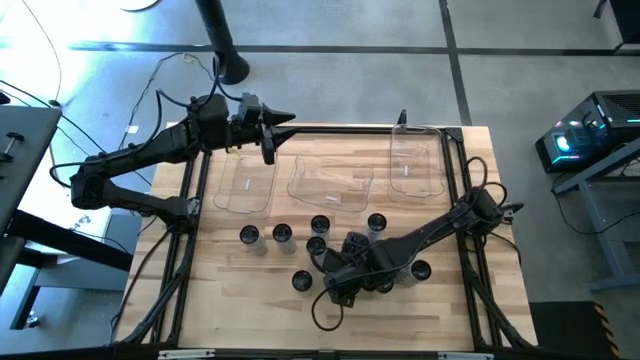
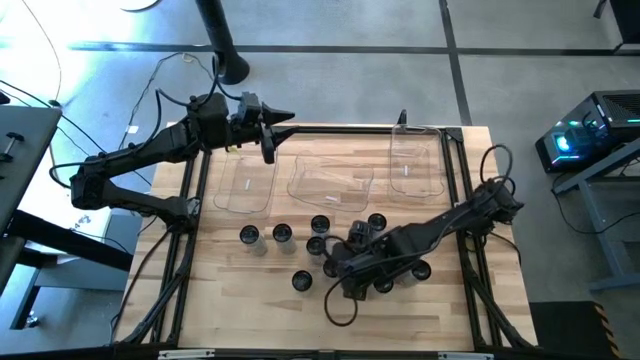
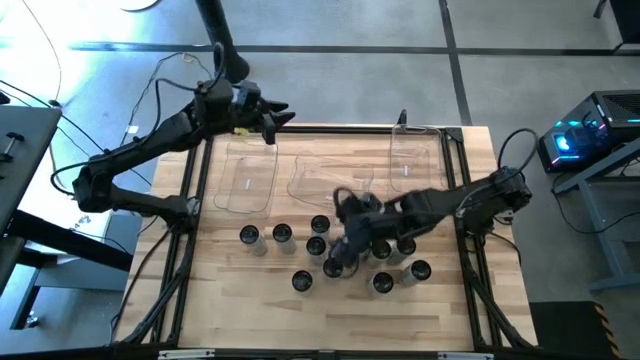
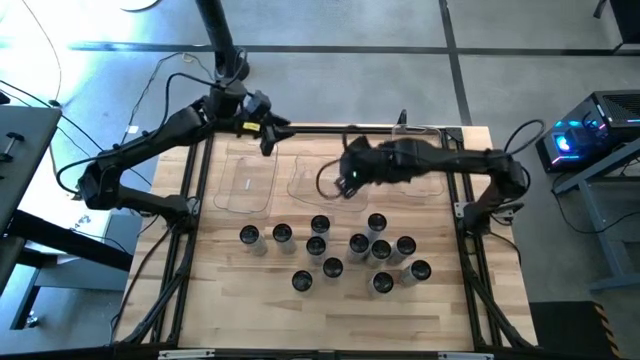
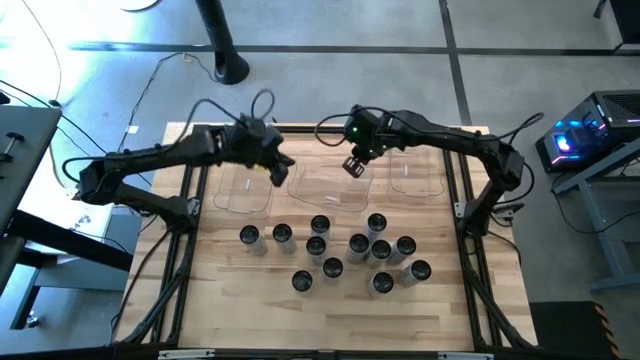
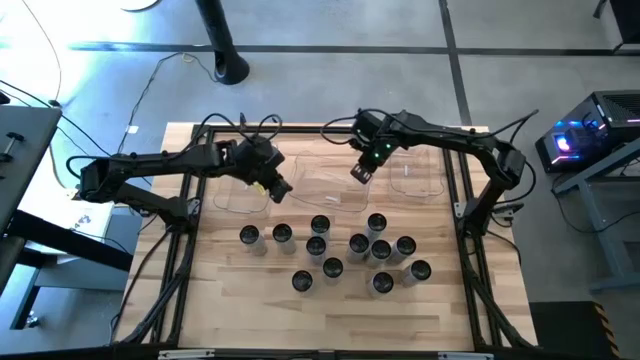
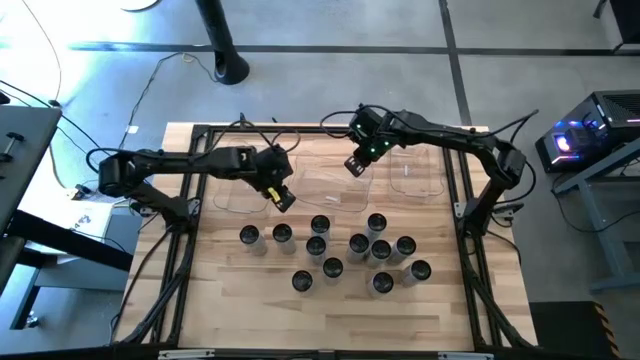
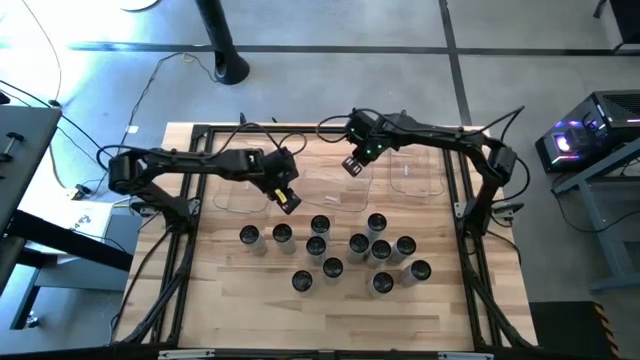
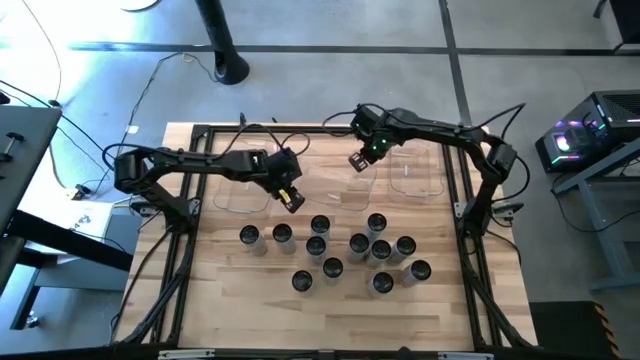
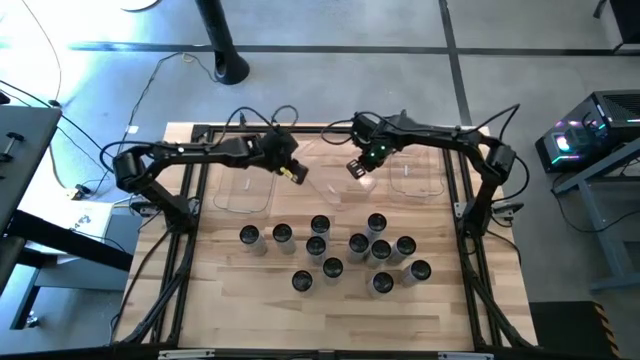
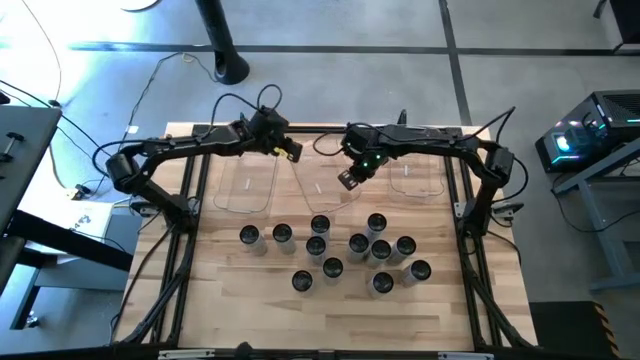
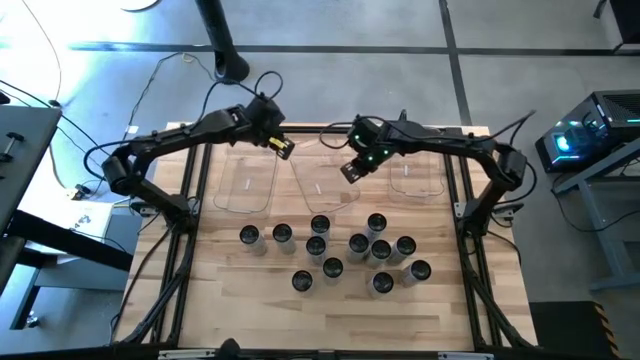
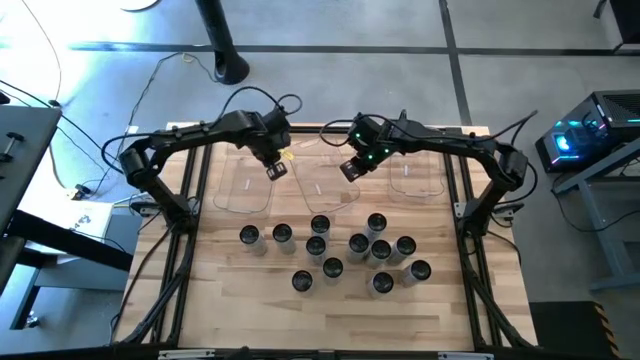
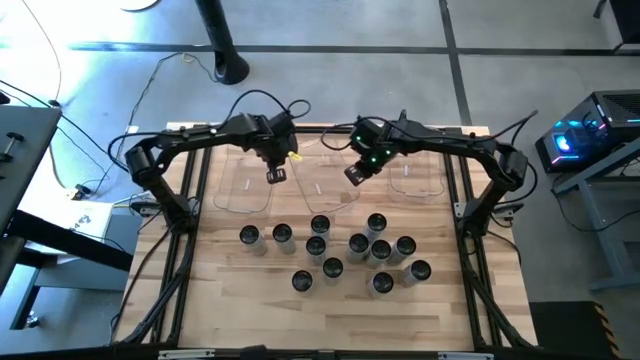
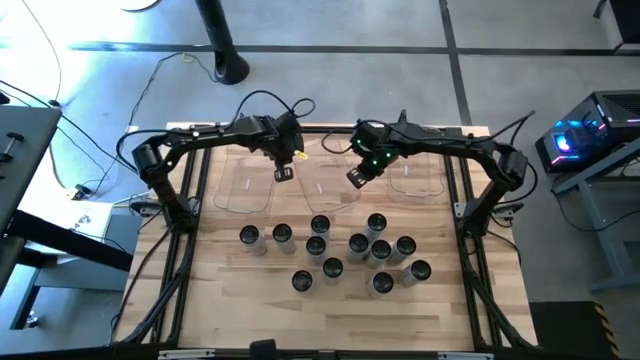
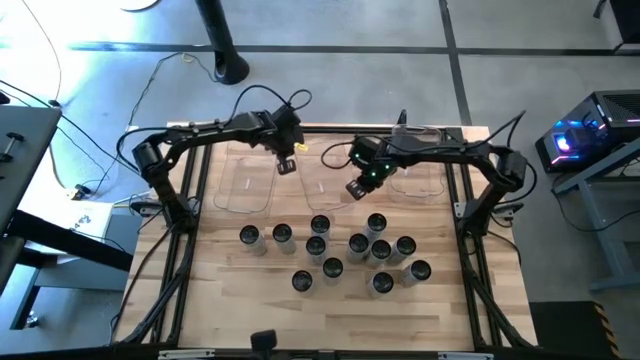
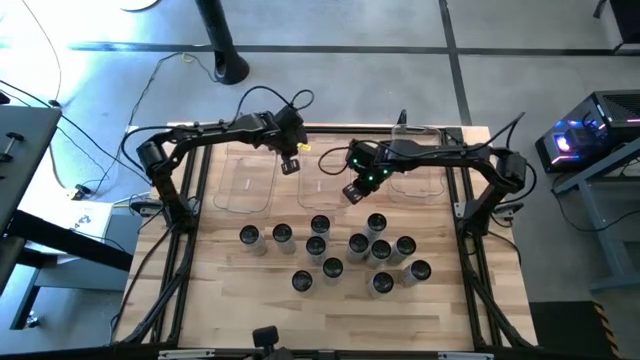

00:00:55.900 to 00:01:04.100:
Task: Sort soda cans
Adjust the top center transparent bin

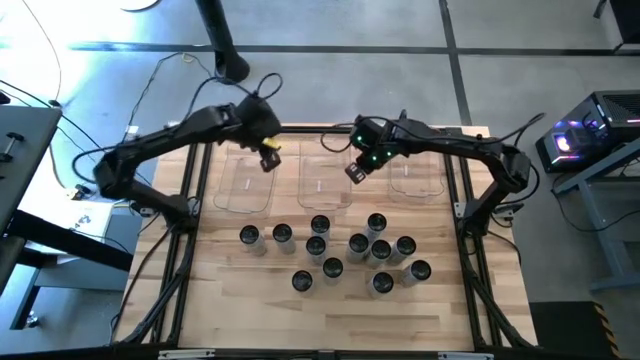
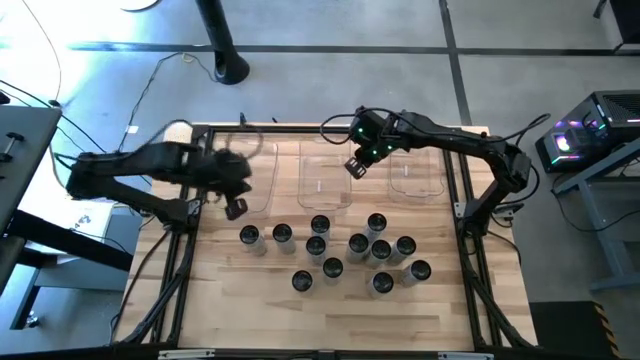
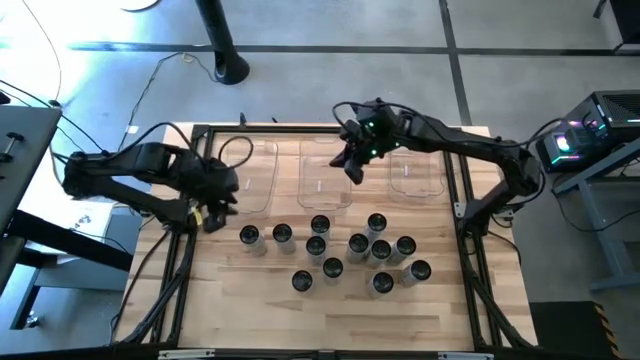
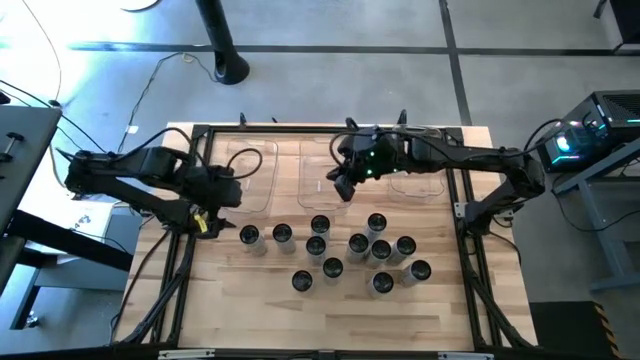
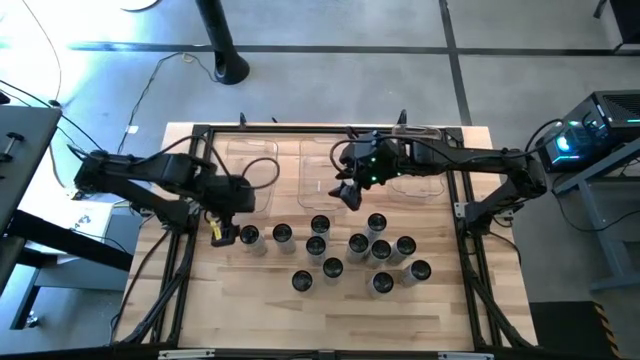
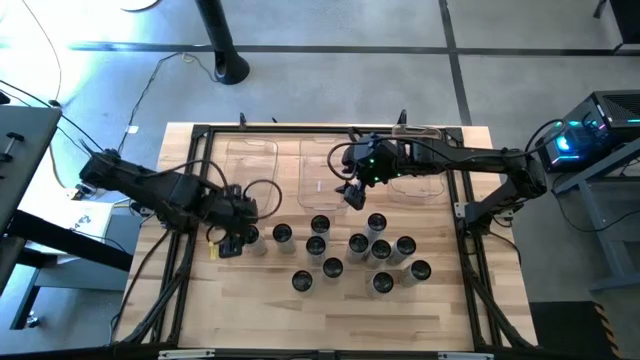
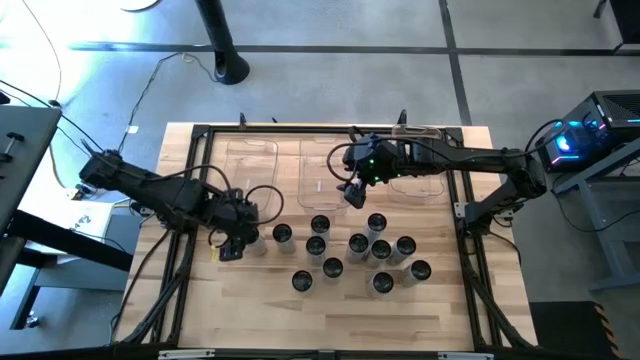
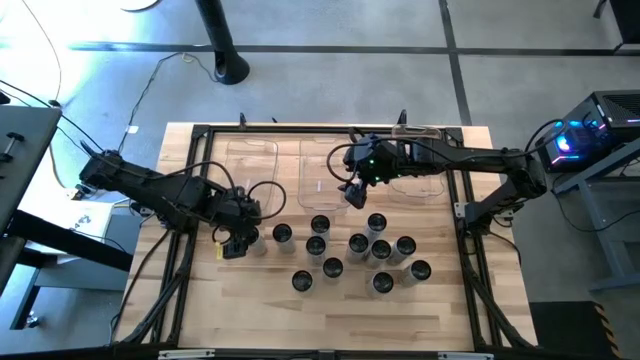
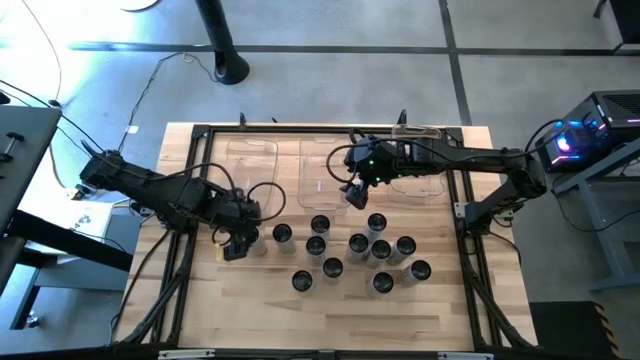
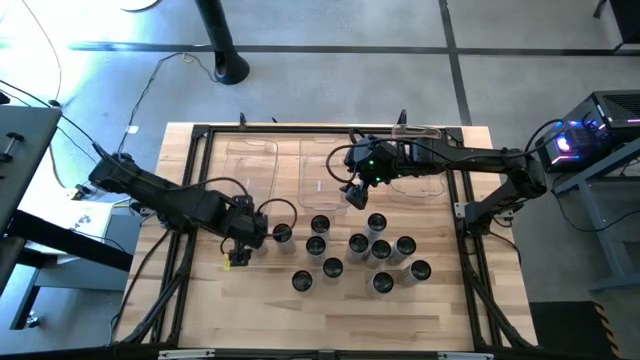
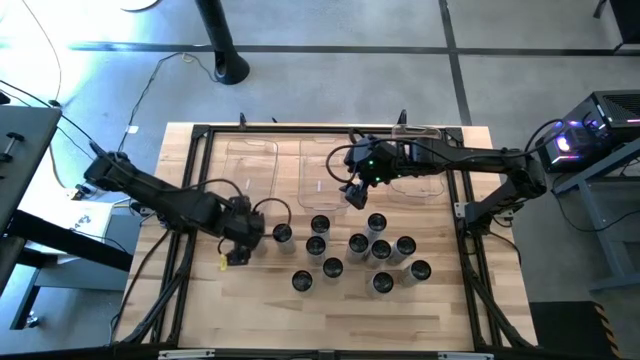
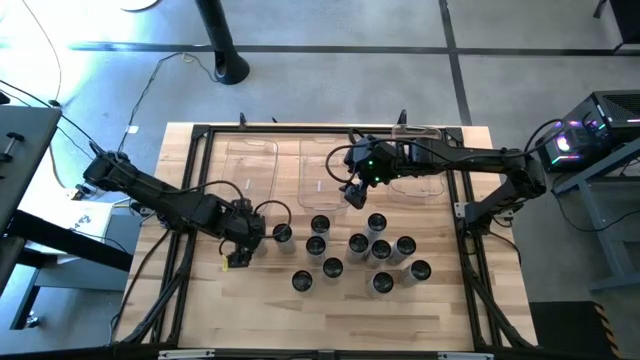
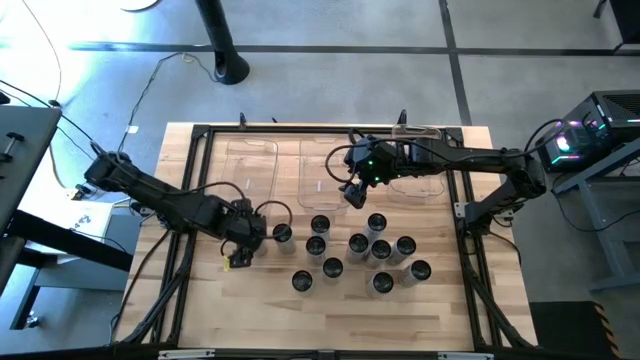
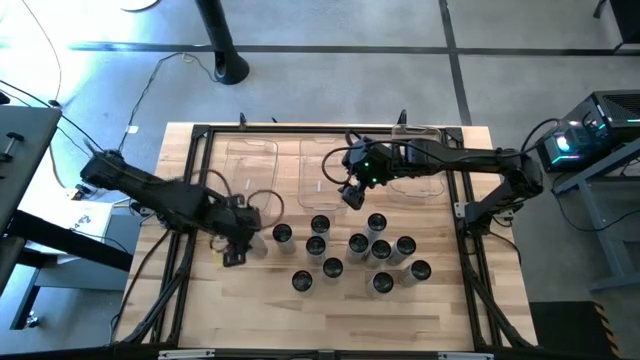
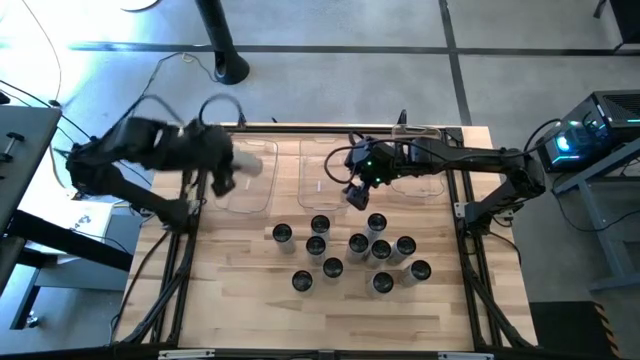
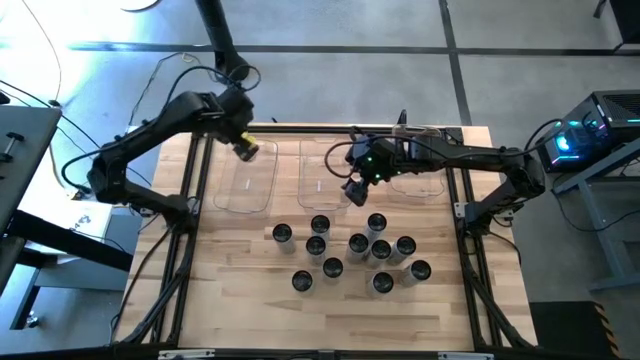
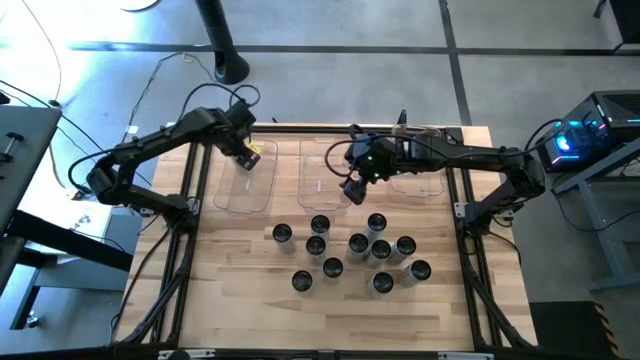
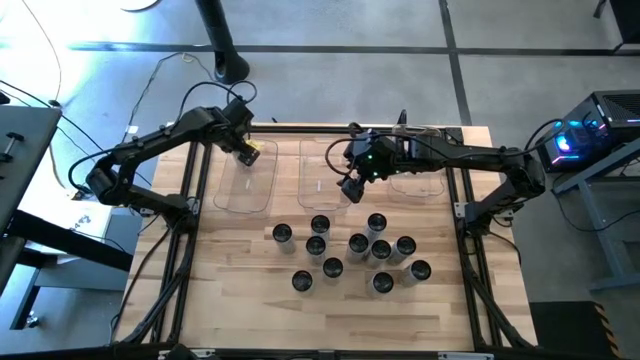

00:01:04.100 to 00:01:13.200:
Put the white-yellow soda can into the top left transparent bin

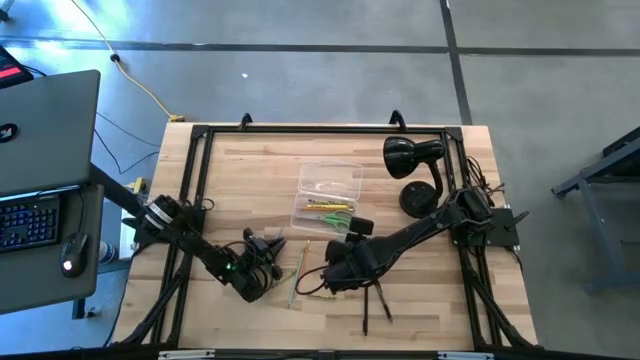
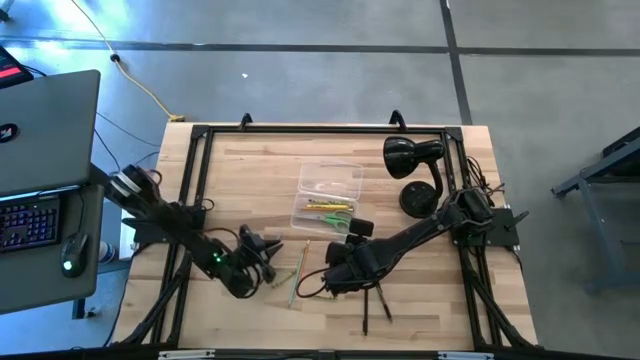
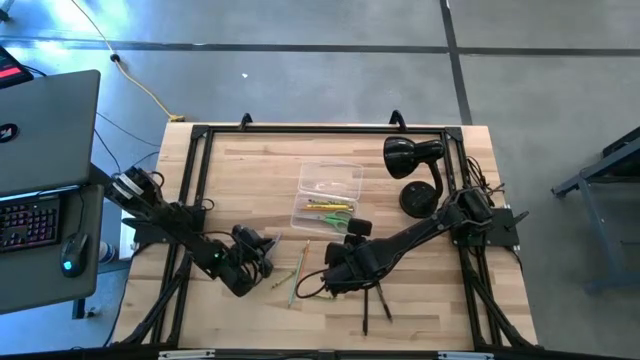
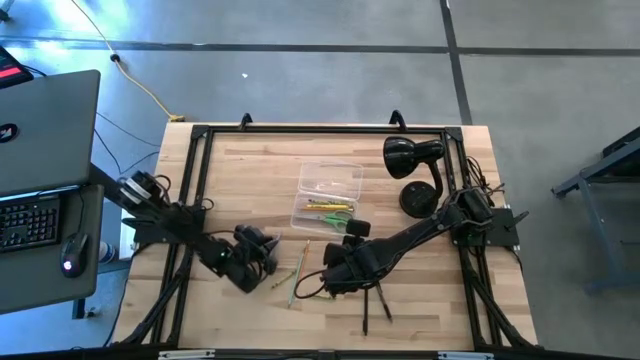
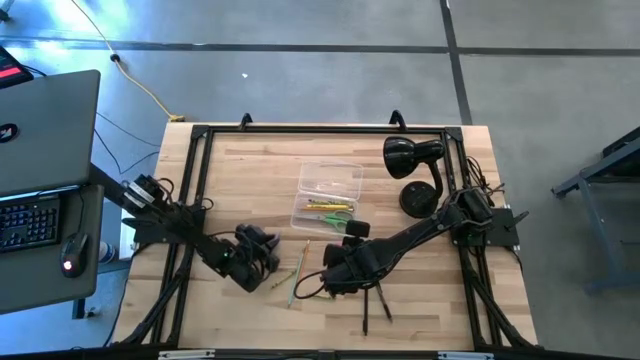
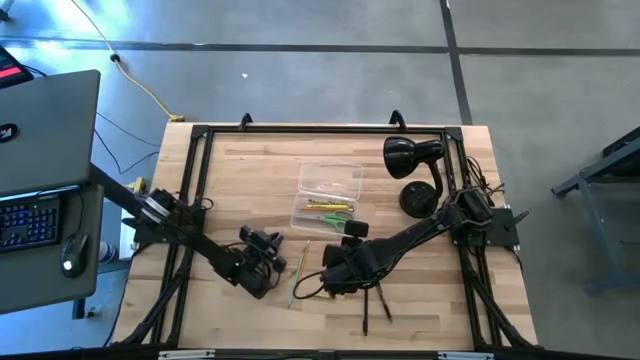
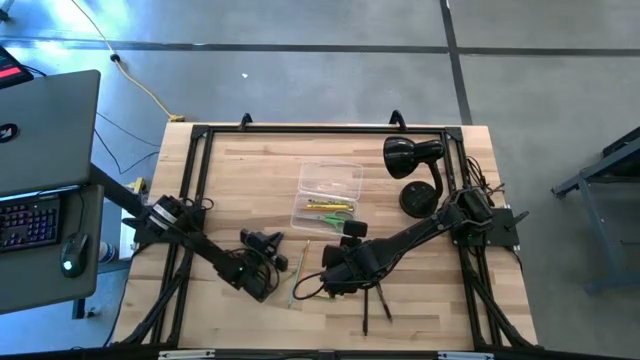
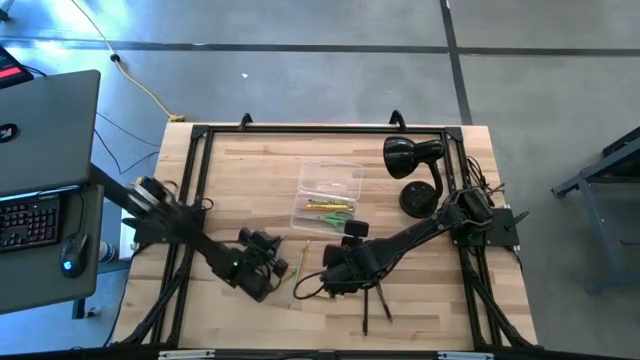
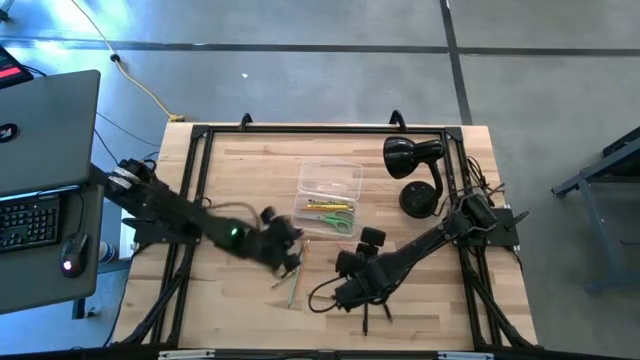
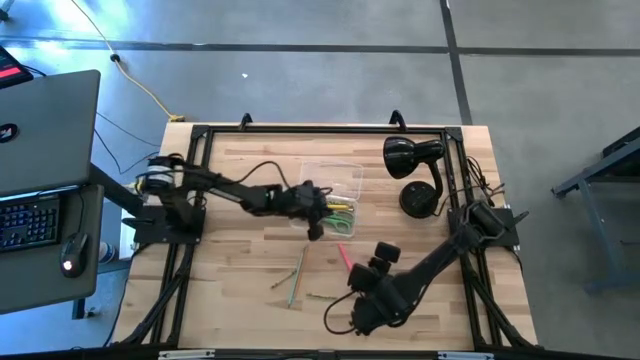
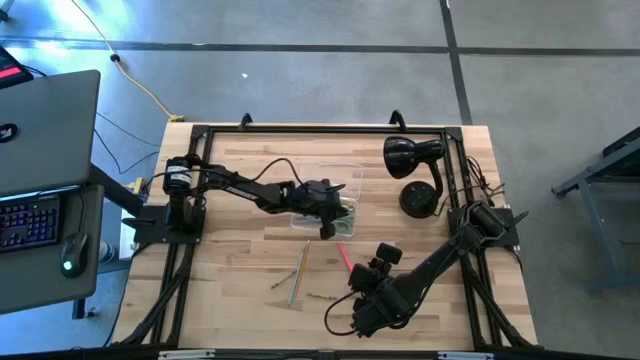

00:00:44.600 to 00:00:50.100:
Task: Pick & place school supplies into a supply box
Put the blue pencil into the transparent supply box
